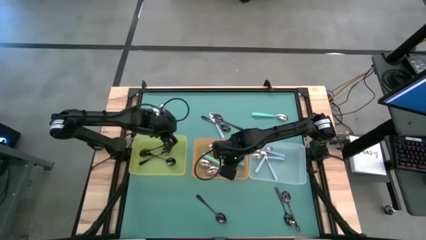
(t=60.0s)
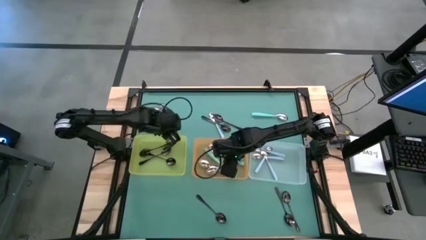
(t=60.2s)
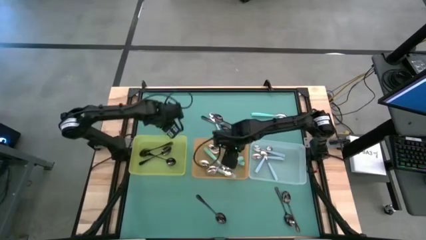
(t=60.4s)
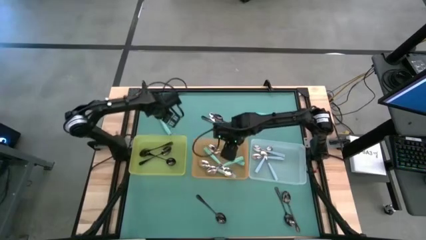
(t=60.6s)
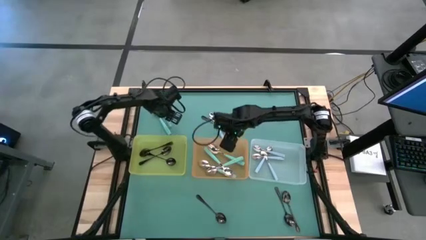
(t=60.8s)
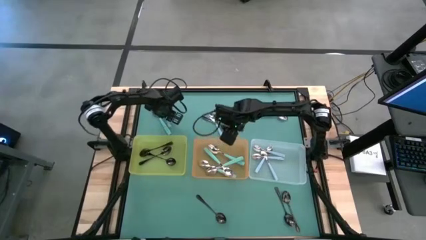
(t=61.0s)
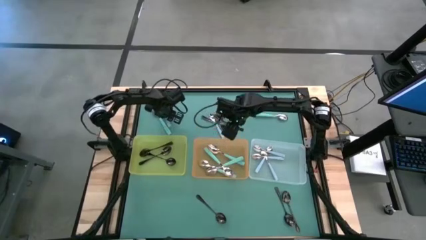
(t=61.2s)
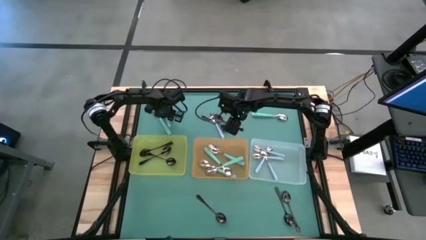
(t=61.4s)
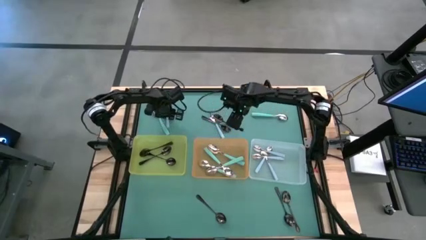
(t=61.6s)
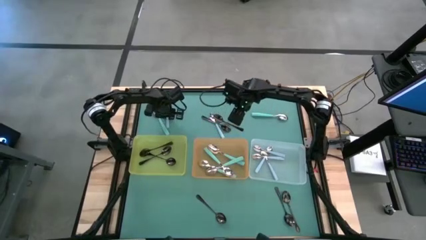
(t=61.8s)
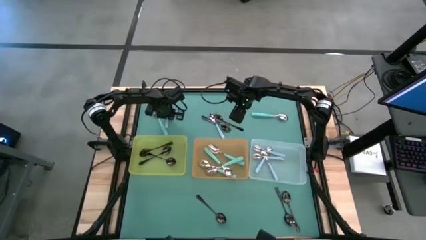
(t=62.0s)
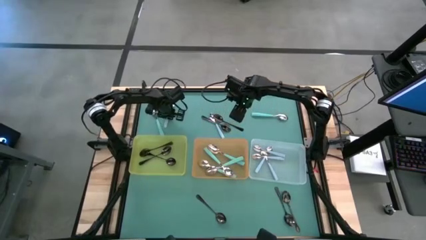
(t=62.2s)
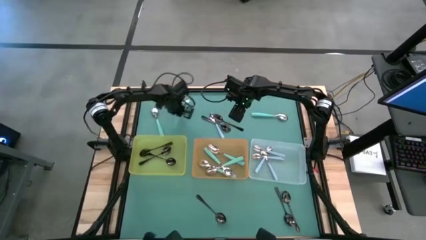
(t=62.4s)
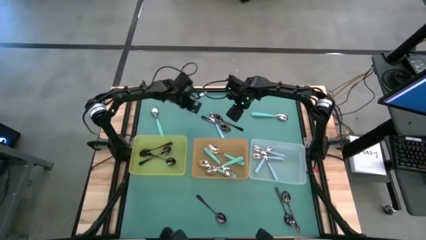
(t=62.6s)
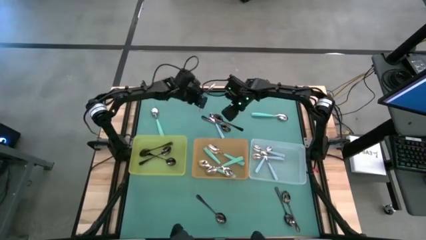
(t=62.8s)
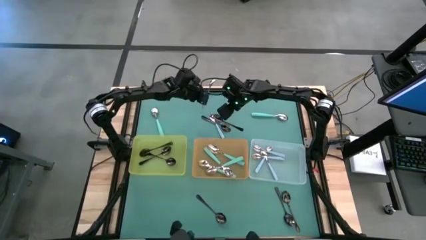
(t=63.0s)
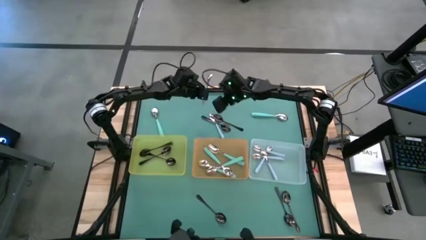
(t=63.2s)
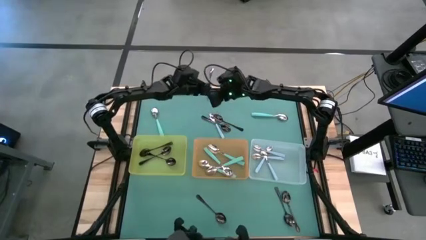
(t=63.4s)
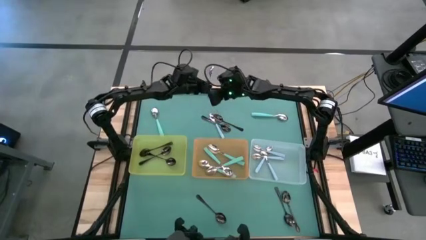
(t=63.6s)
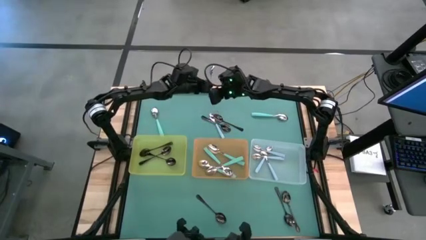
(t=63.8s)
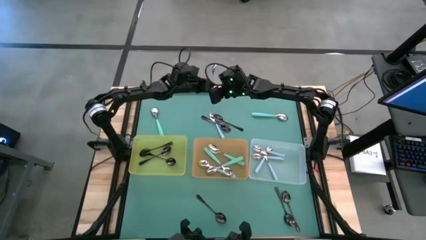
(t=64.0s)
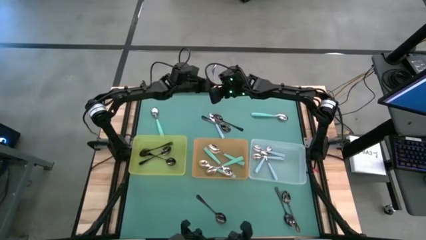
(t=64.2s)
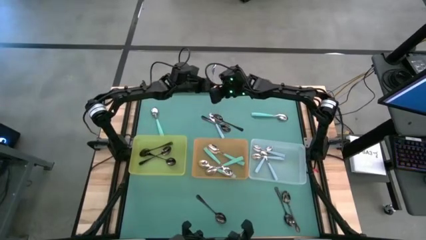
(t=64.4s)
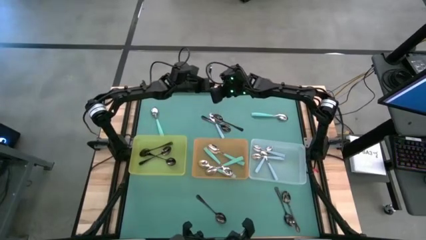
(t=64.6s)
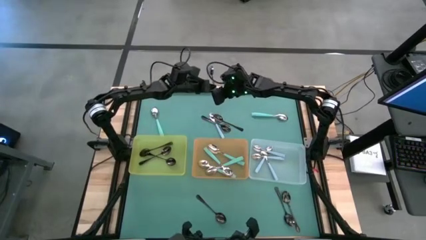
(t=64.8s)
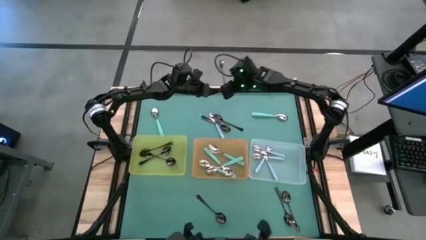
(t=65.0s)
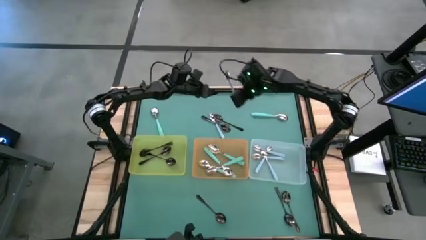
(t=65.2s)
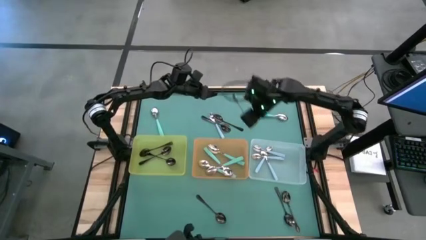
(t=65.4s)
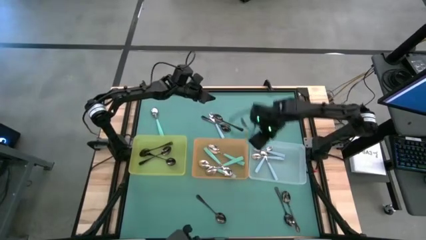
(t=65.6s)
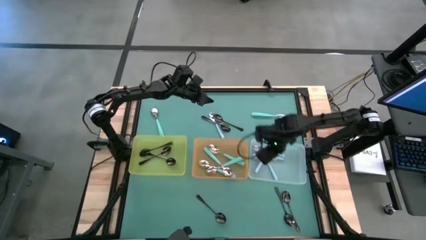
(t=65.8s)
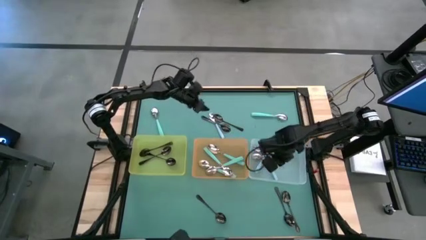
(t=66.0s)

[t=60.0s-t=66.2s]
Task: Sort silverware by color (type)
Put the blue spoon into the white bin

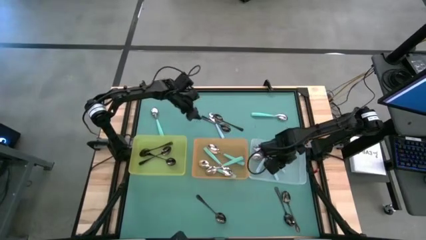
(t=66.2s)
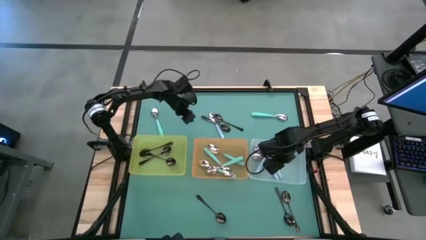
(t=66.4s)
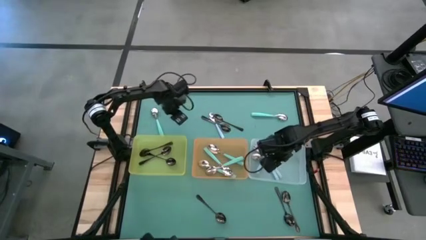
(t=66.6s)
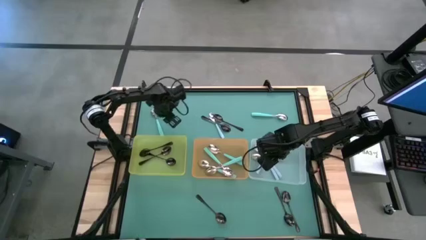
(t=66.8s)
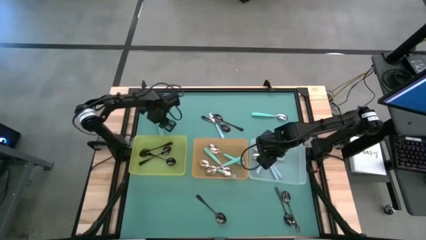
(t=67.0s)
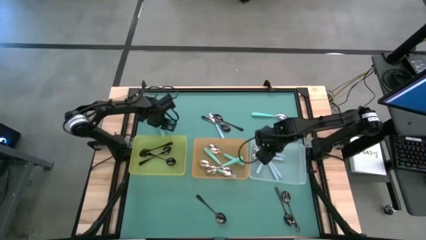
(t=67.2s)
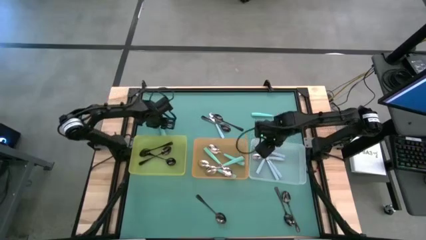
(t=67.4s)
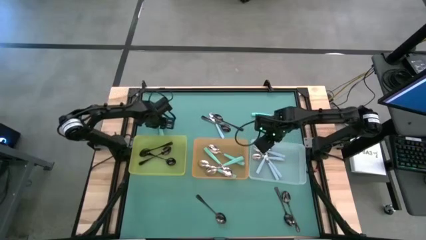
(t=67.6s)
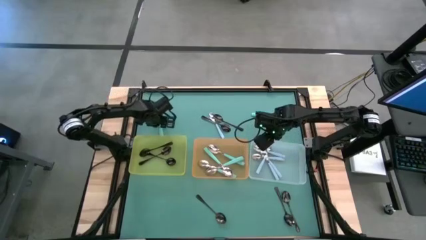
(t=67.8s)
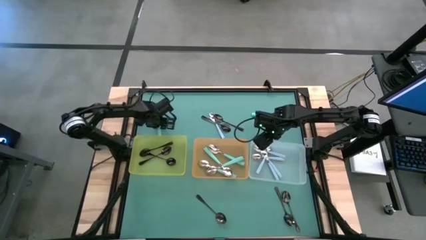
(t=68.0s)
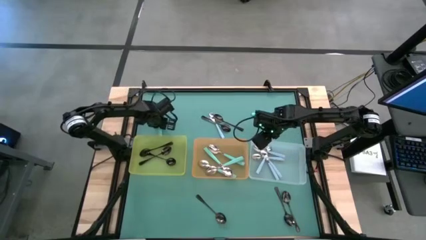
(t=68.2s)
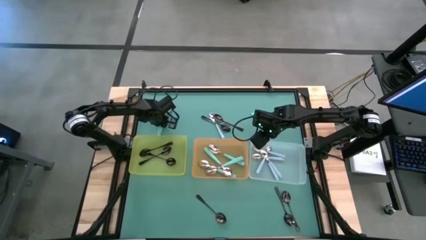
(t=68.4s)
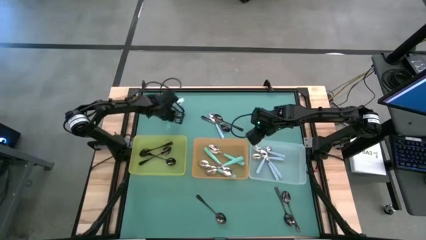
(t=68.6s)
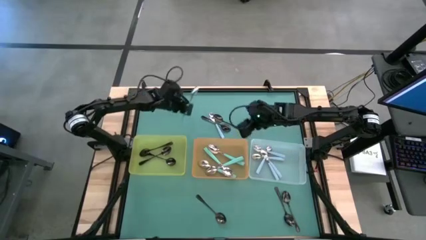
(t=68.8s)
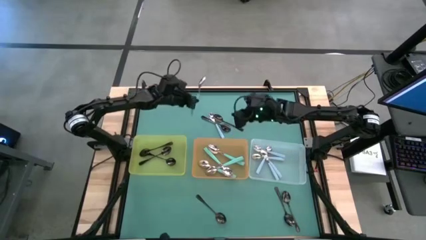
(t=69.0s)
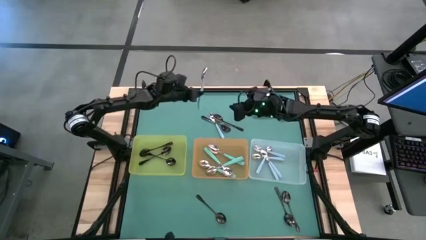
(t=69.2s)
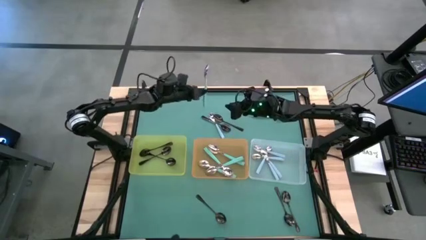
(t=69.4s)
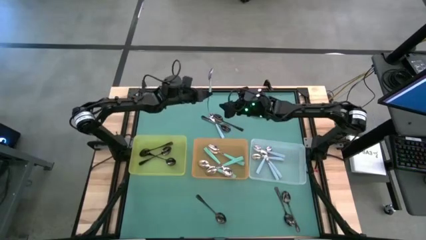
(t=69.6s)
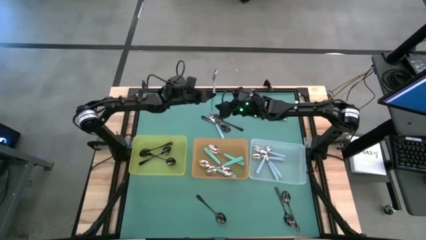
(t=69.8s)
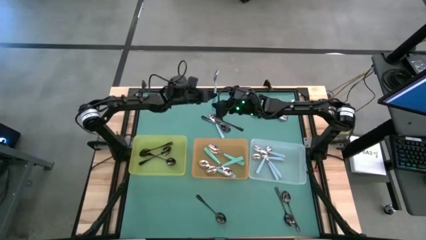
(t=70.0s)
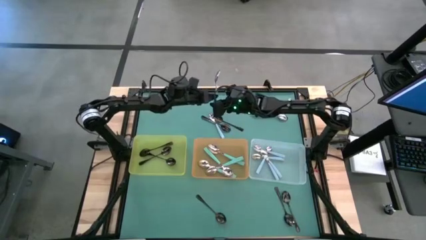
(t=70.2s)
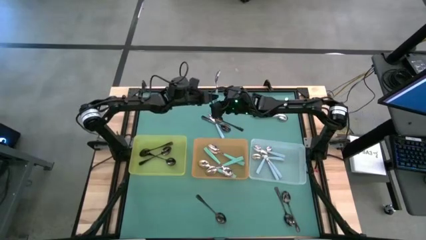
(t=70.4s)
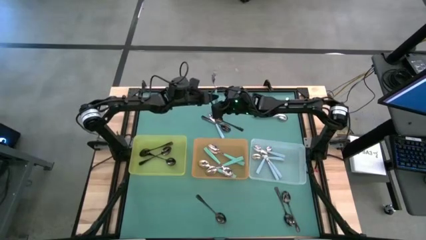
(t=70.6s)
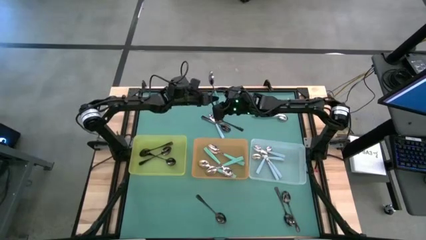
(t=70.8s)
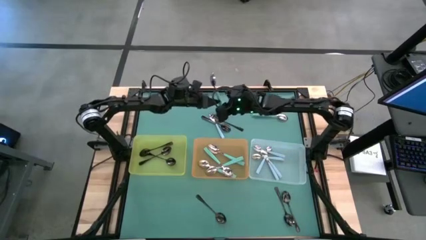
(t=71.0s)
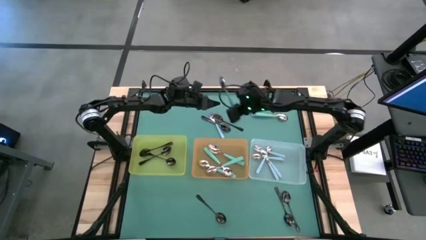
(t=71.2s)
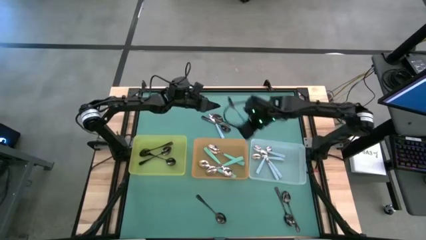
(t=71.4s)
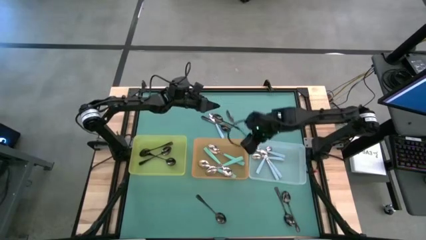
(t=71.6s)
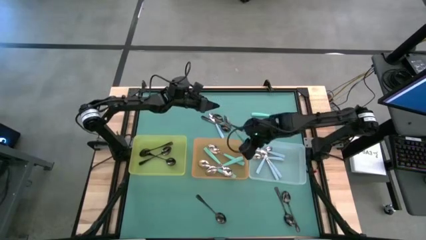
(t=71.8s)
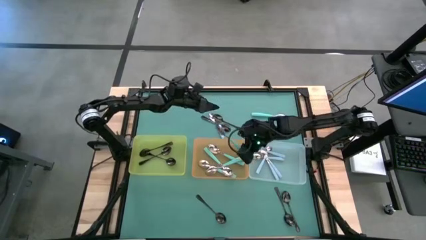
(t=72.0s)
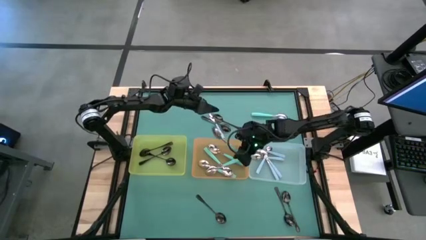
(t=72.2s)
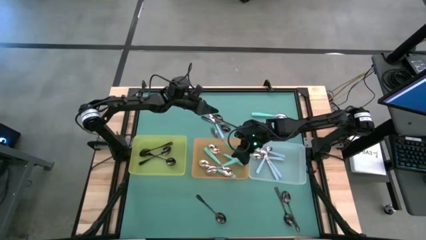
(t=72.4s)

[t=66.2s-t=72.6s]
Put the green spoon into the orange bin

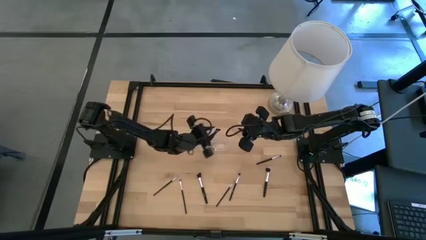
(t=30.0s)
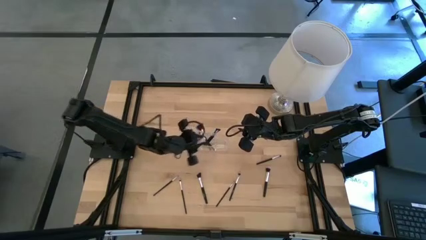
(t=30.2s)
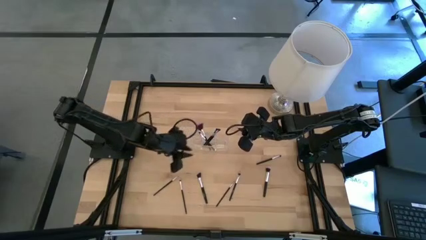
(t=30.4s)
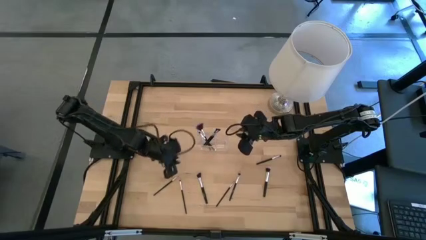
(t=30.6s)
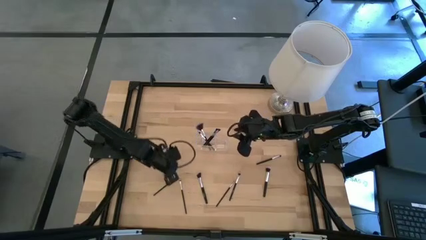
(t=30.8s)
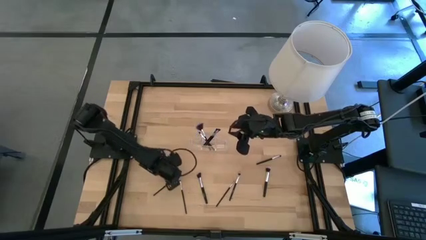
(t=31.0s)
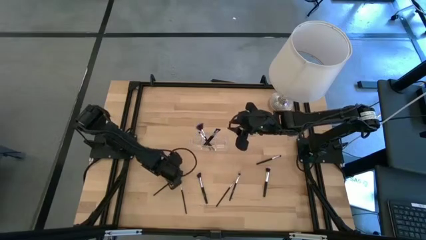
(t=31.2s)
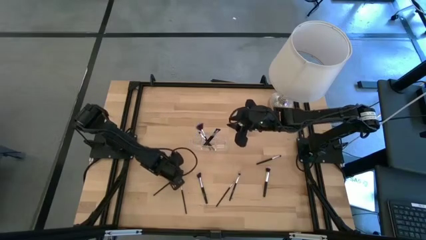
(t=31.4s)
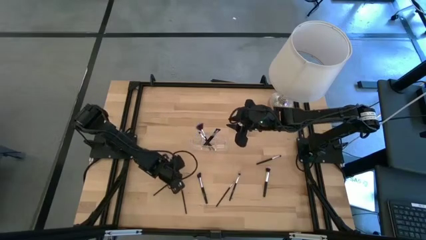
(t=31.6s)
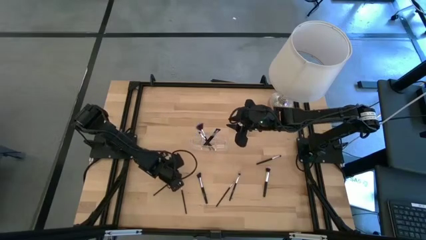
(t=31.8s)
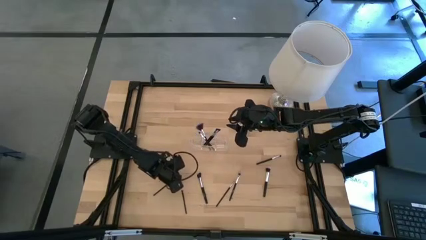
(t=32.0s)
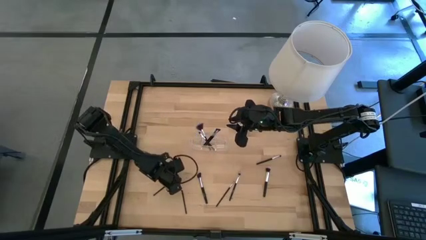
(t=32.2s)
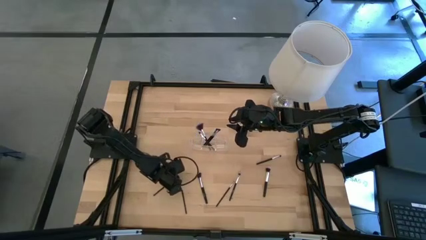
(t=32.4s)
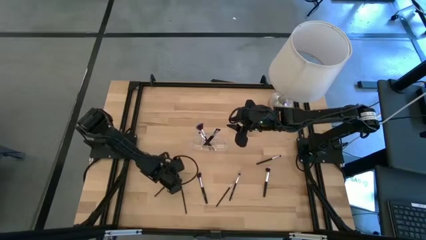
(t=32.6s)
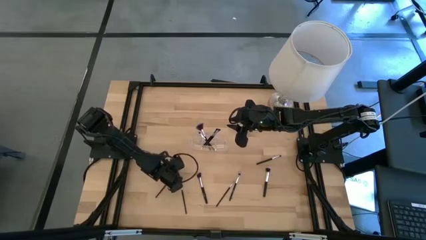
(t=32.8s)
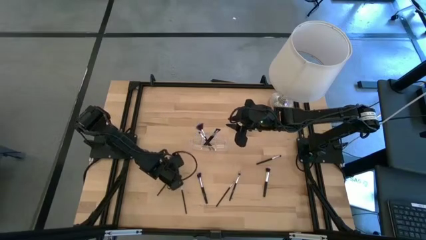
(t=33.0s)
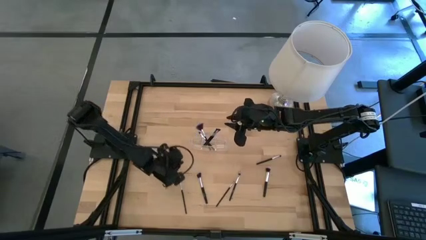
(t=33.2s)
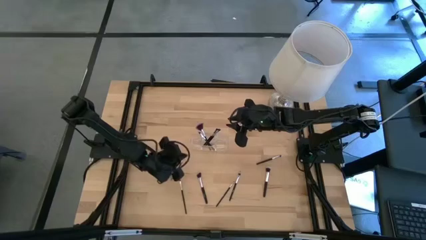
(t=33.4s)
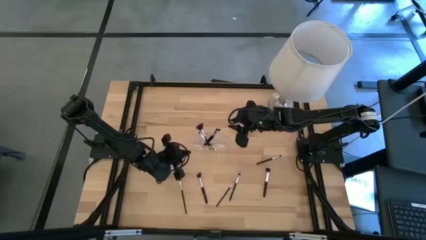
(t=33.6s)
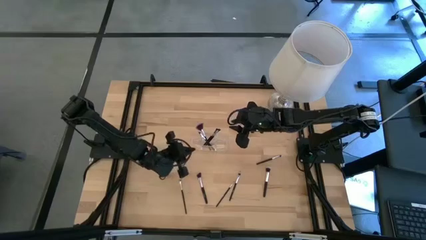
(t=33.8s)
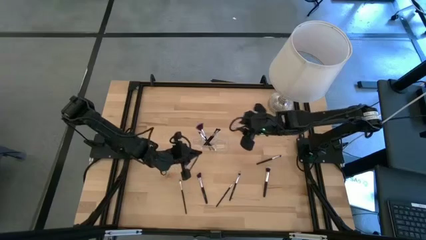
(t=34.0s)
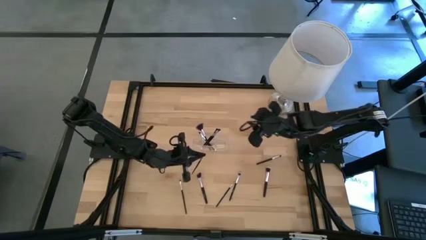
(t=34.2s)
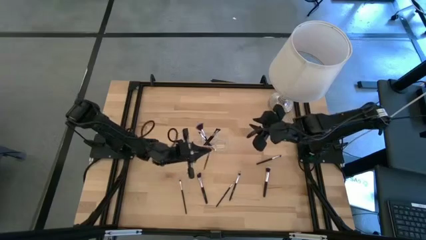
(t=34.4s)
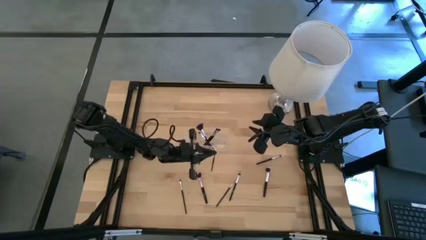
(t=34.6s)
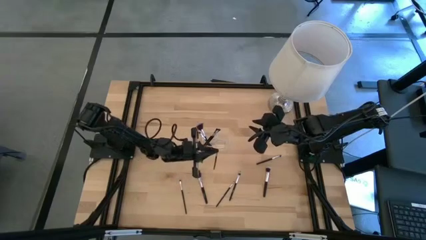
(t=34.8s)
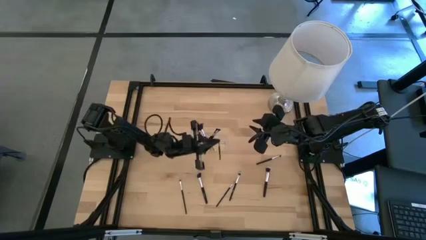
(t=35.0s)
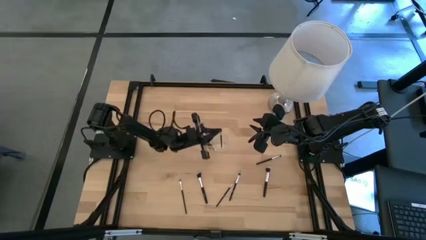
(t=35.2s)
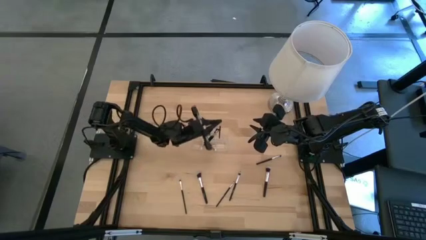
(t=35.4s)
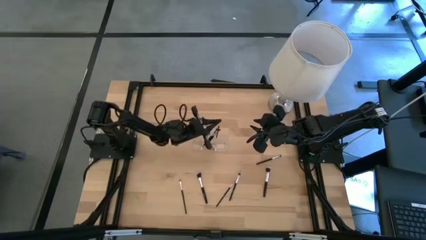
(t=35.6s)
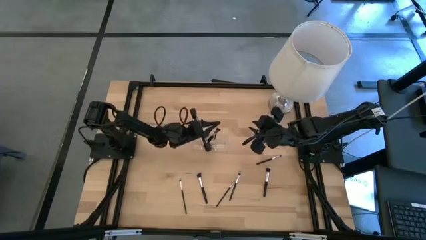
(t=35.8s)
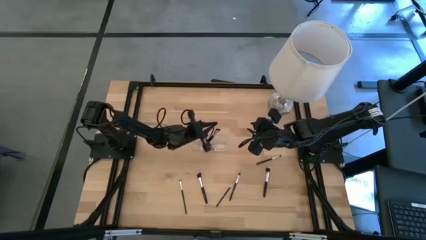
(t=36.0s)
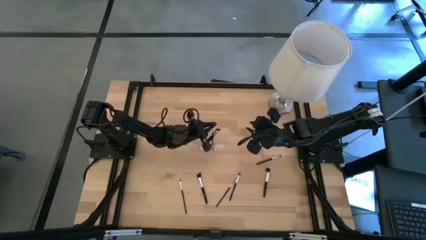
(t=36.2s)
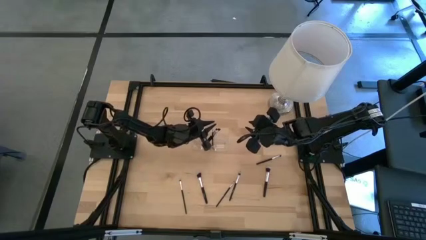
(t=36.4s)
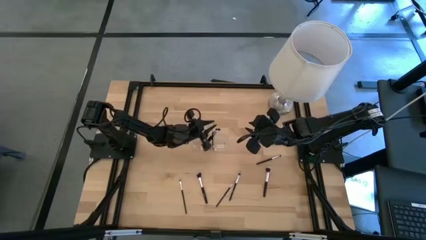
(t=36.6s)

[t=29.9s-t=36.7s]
Task: Put items in baskets/containers
Put the eyeshadow into the transparent organizer
